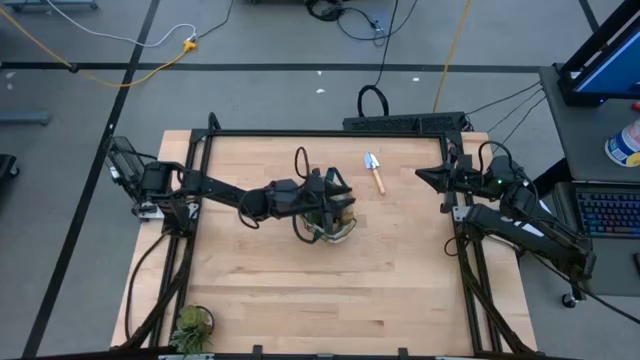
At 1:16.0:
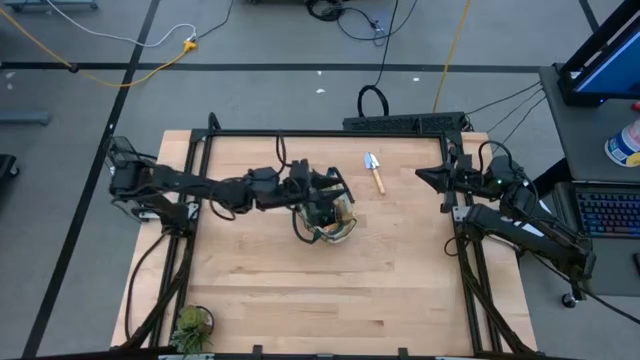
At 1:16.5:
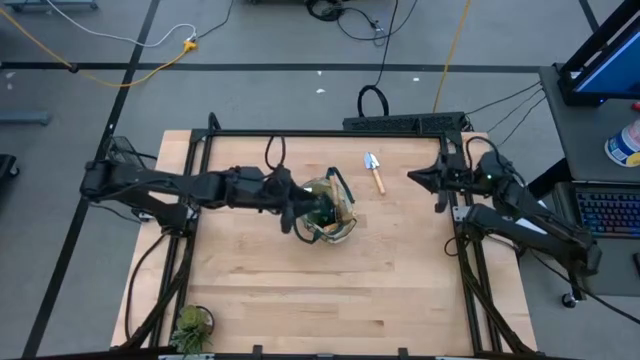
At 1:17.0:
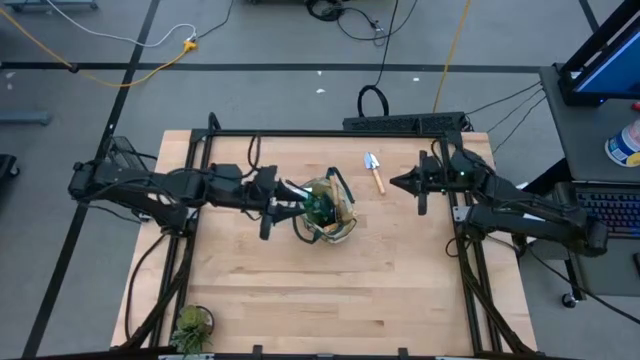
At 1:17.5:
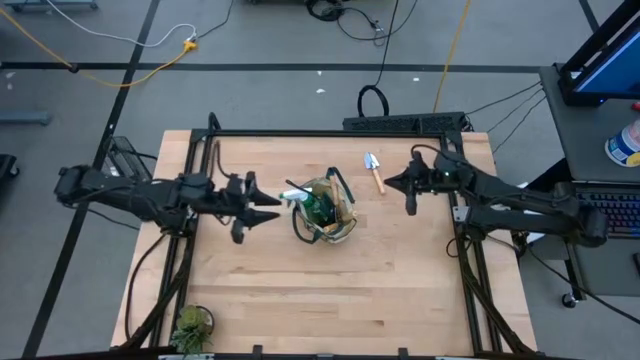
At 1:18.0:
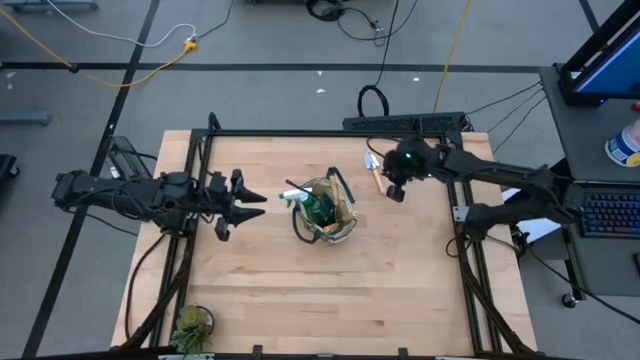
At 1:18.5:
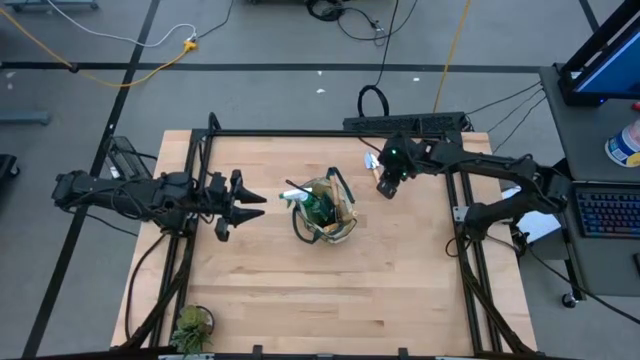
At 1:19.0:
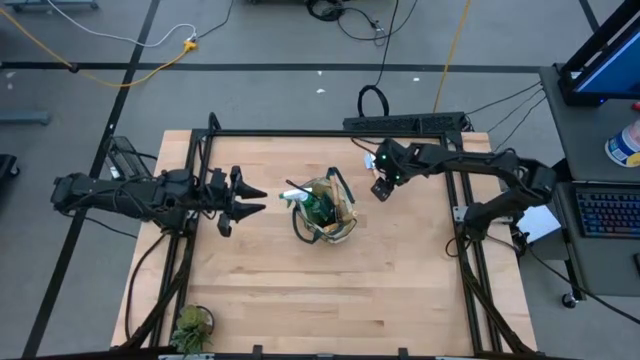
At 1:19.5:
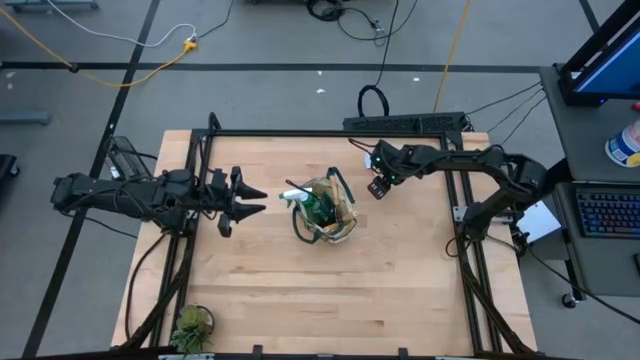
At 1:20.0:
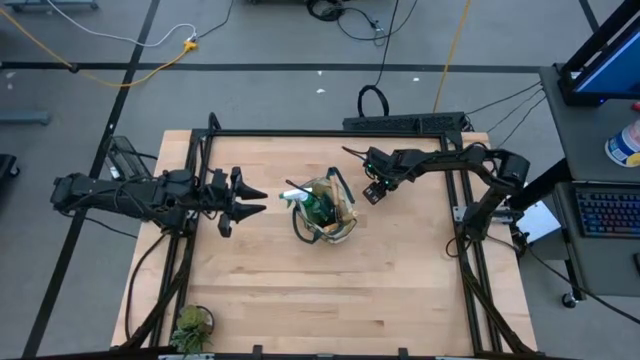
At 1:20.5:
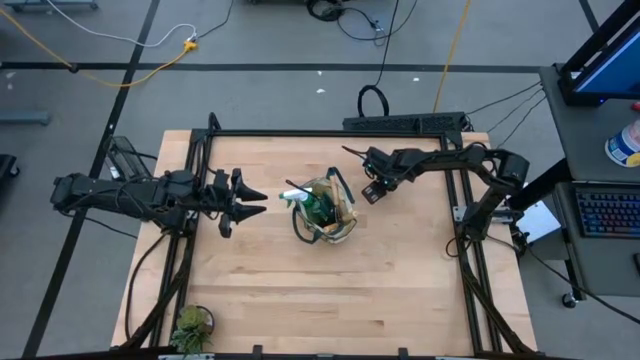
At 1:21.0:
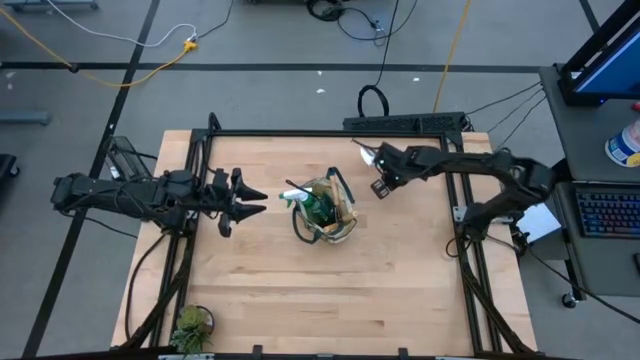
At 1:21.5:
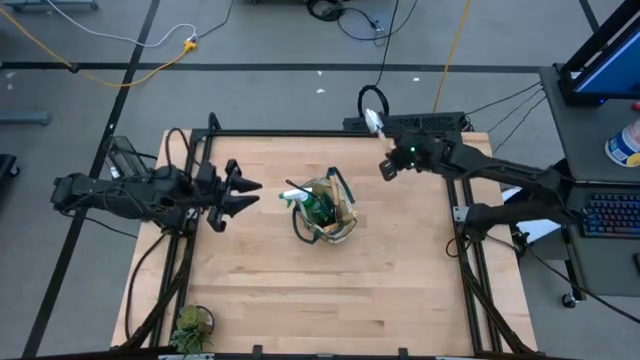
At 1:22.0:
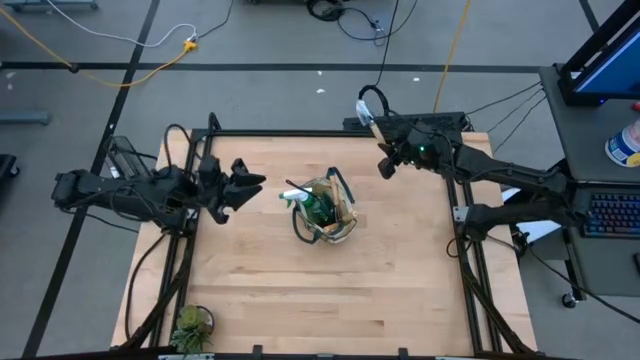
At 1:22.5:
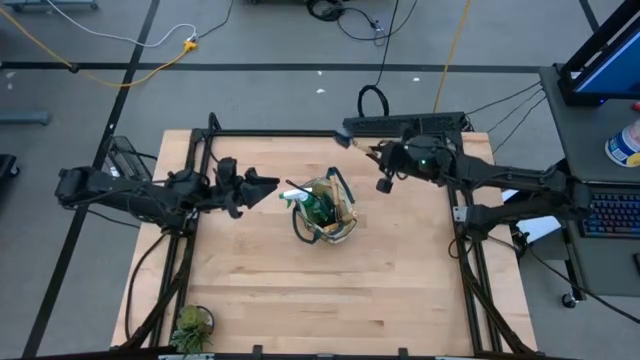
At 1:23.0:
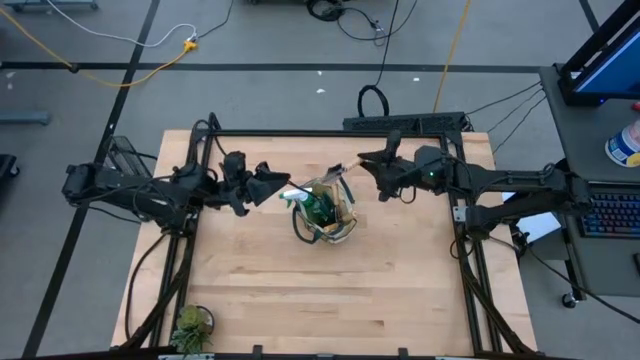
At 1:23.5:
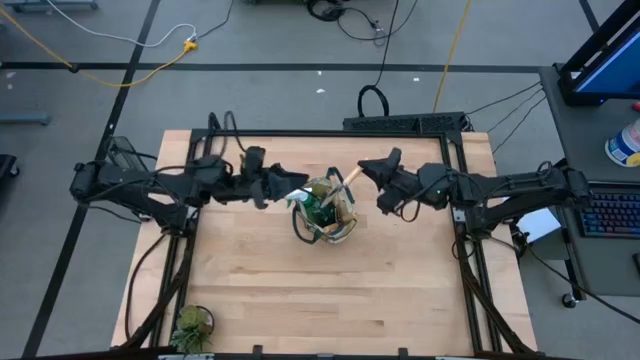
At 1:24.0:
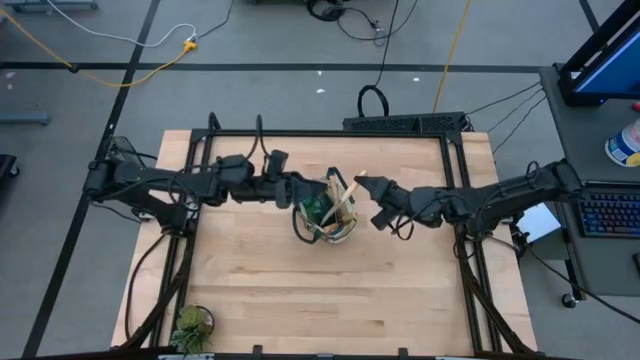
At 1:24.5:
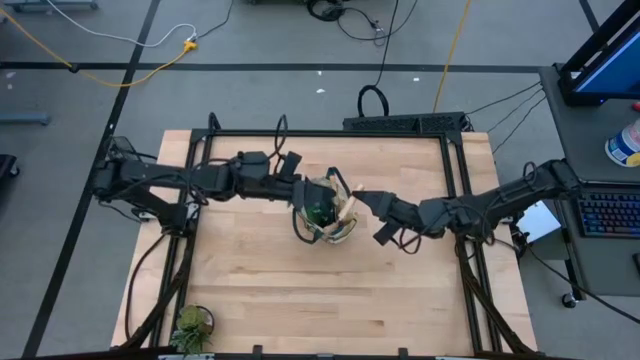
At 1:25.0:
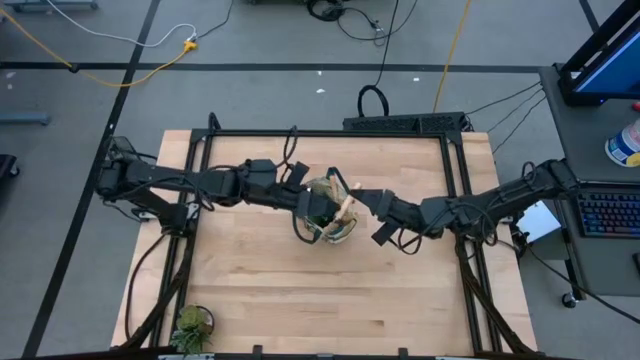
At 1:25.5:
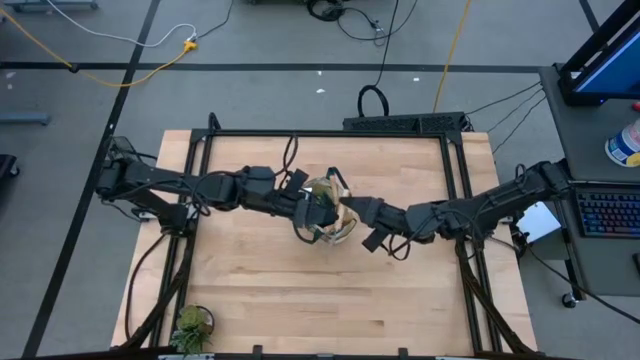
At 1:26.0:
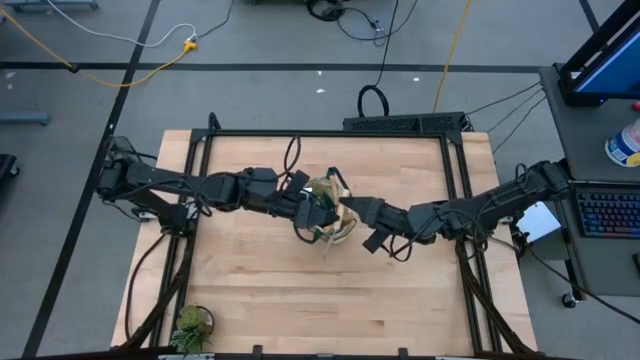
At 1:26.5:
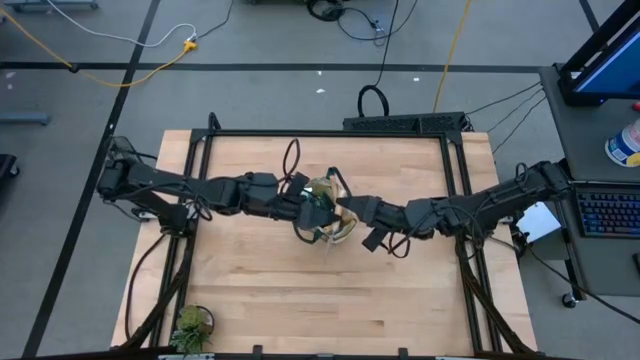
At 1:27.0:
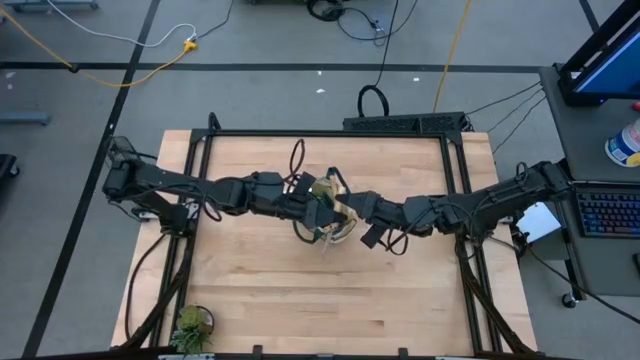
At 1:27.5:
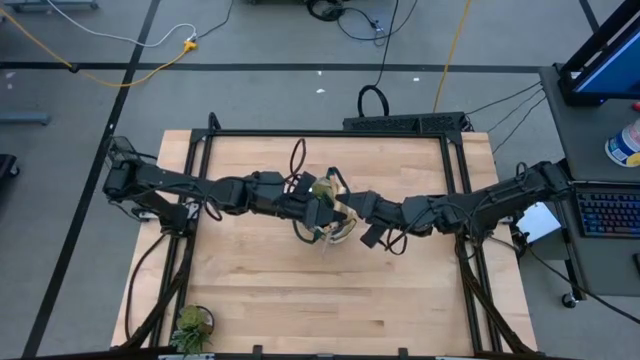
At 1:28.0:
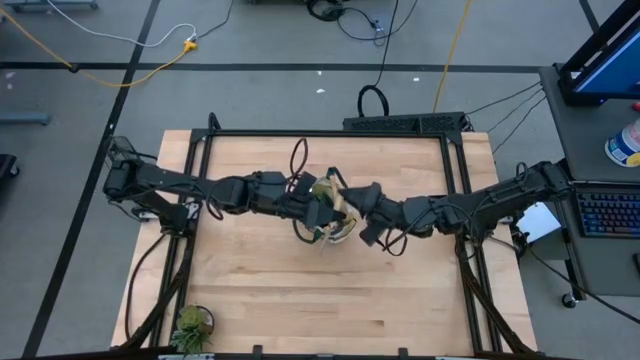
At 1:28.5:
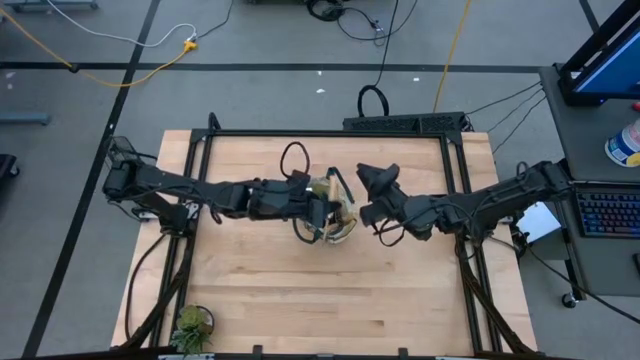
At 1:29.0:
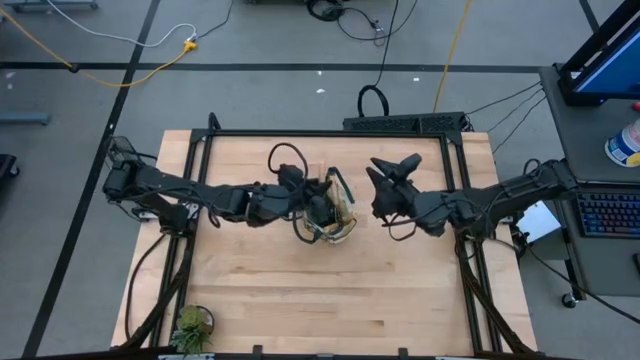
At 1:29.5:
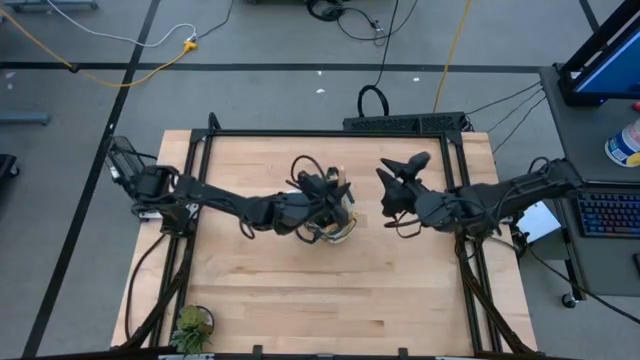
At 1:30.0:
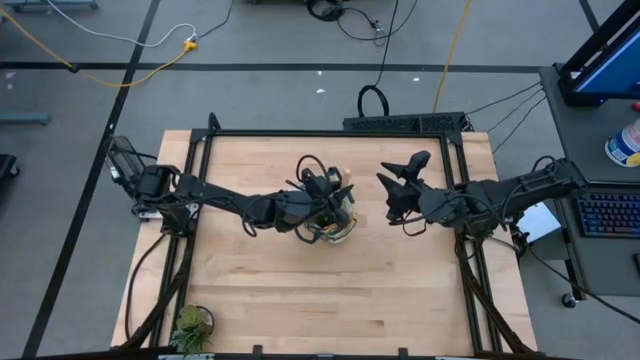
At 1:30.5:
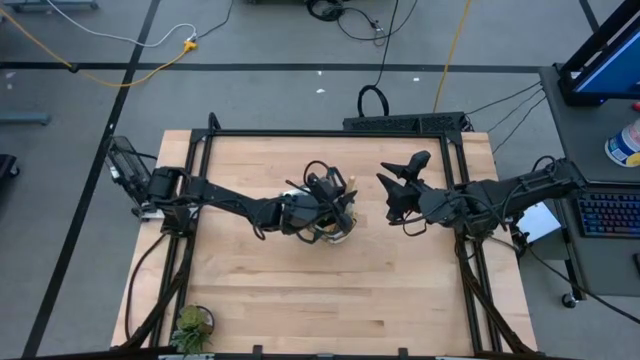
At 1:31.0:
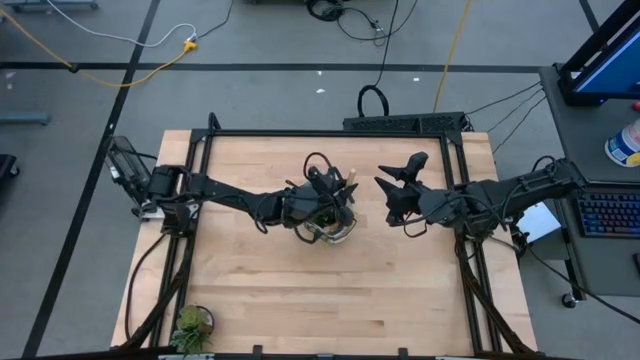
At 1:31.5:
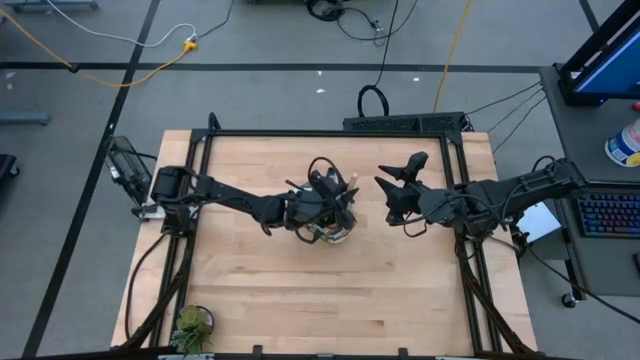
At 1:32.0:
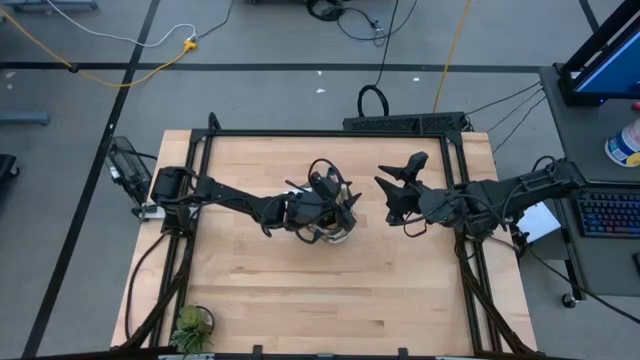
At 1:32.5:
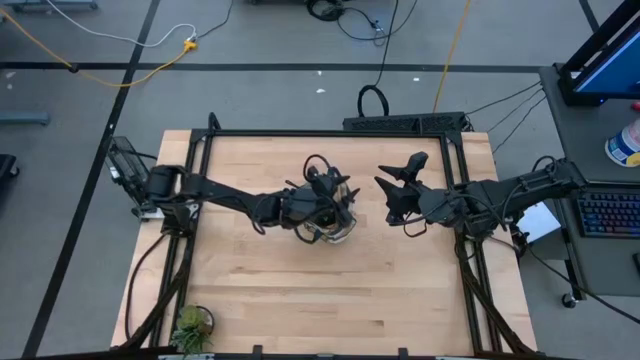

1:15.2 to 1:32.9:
Task: Pick & Place Garden tools in Gardening bag
Put the trowel into the gardening bag

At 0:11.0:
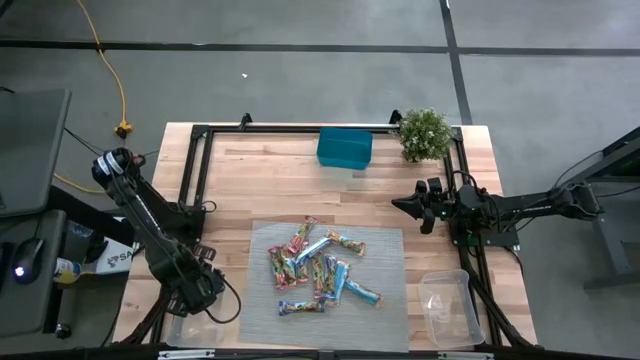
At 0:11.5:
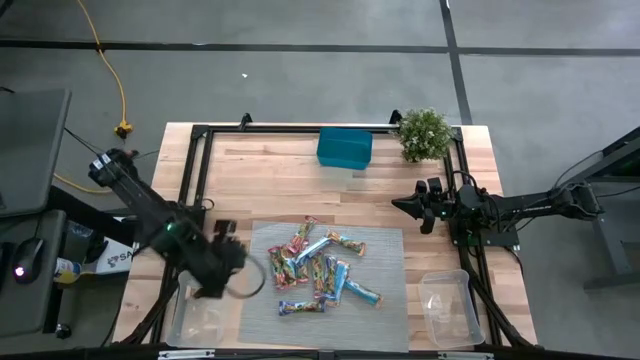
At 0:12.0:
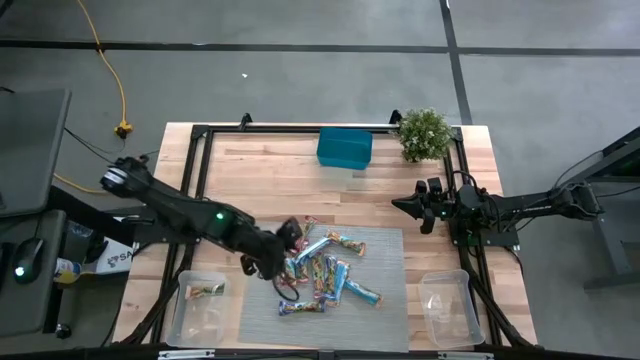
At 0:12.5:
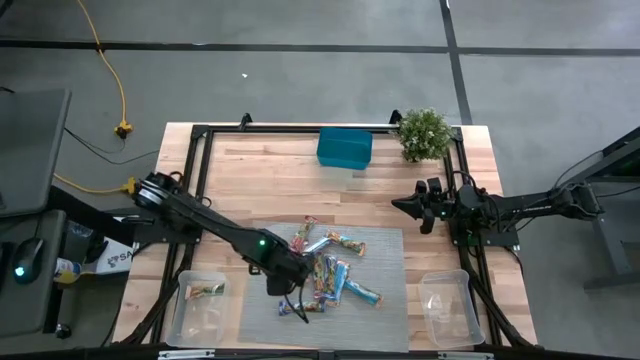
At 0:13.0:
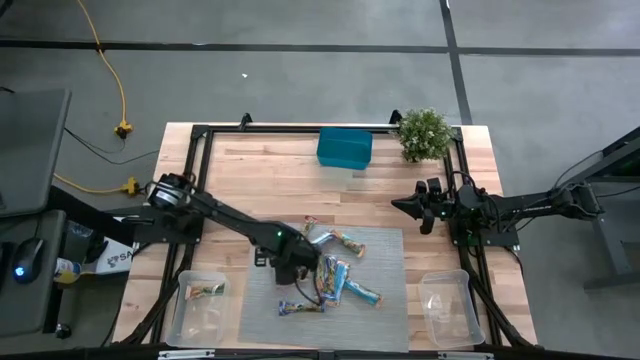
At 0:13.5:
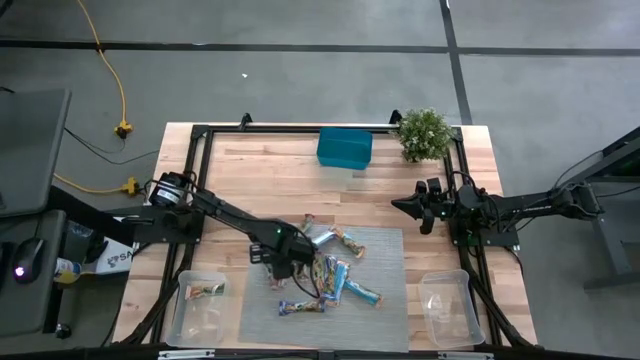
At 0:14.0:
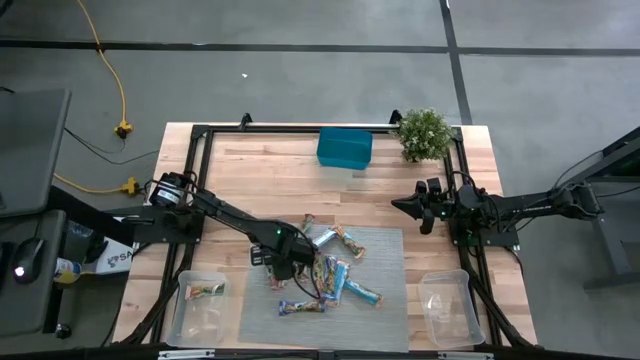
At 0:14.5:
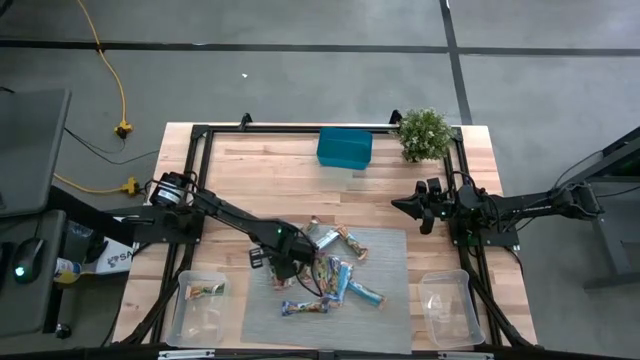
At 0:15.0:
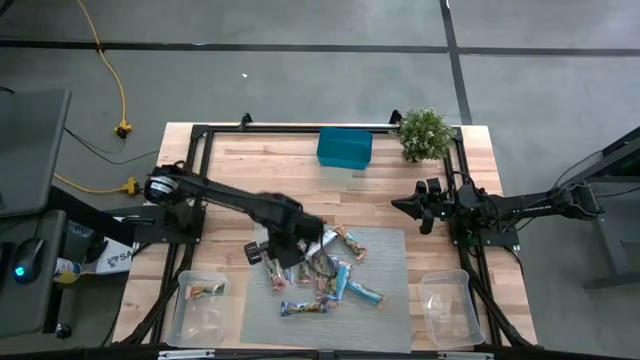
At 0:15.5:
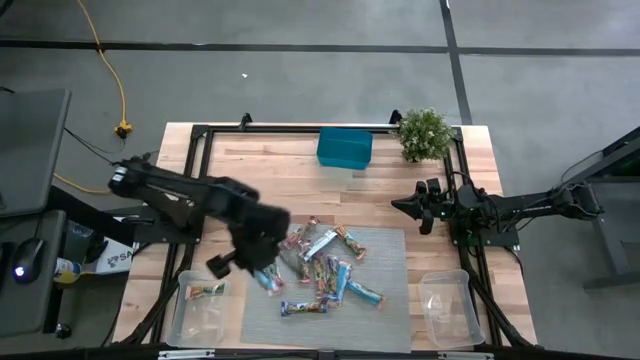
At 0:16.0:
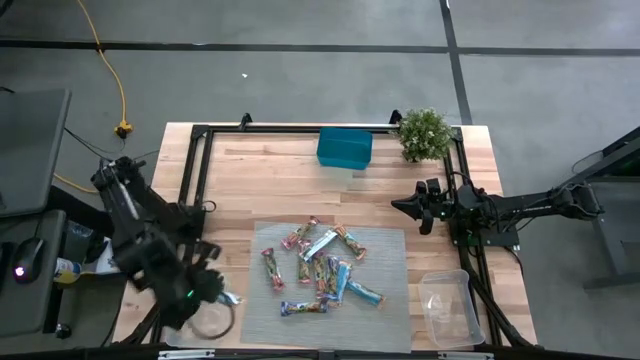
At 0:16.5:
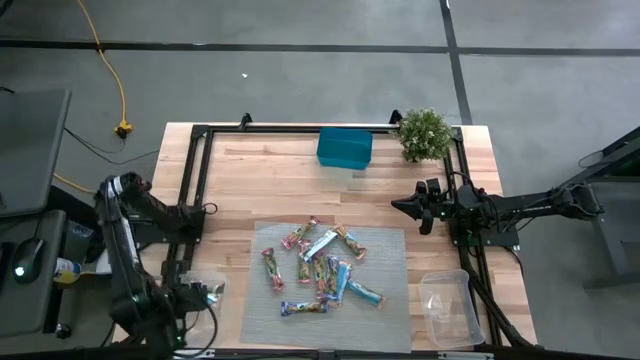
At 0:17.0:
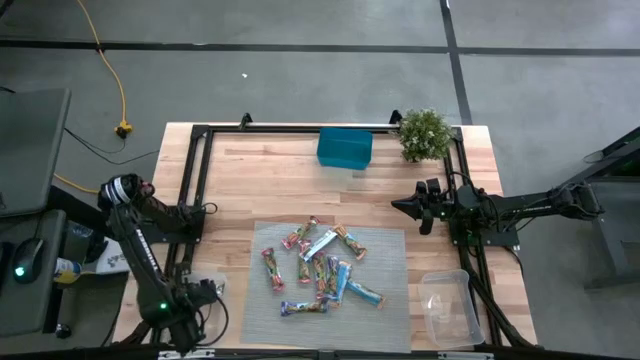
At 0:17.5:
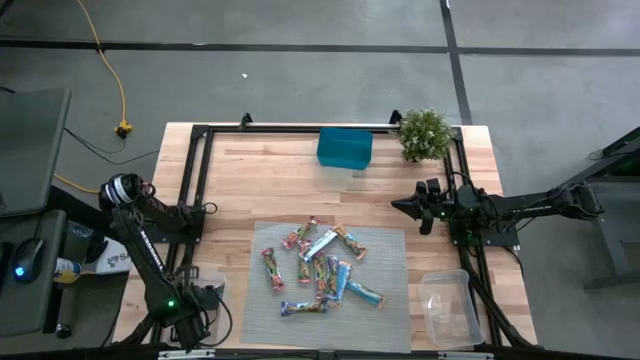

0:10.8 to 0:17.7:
Task: Pick and place Granola Bars by type
Put the yellow granola bar into the left transparent bin
